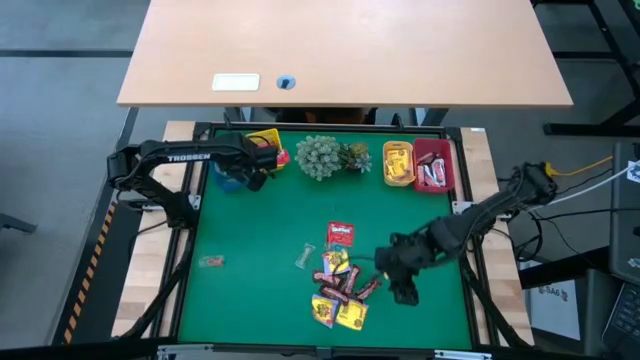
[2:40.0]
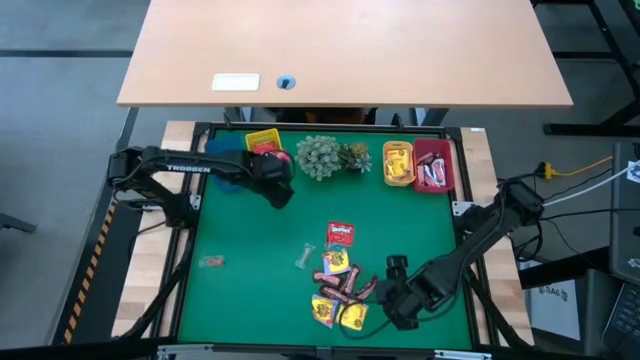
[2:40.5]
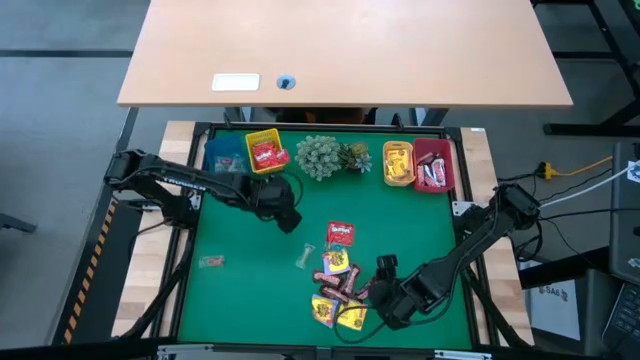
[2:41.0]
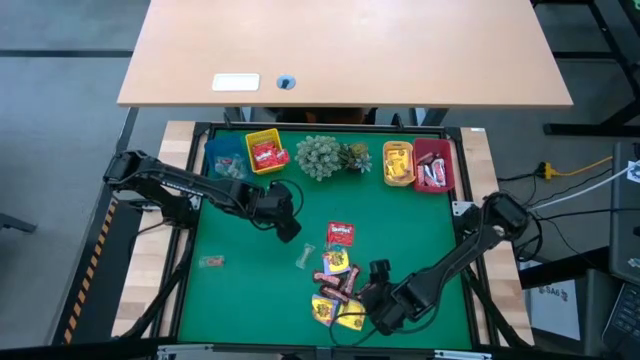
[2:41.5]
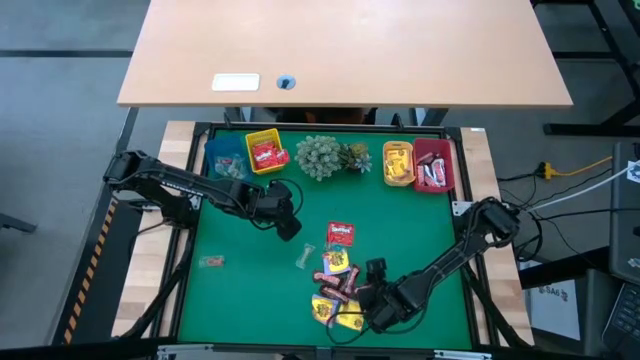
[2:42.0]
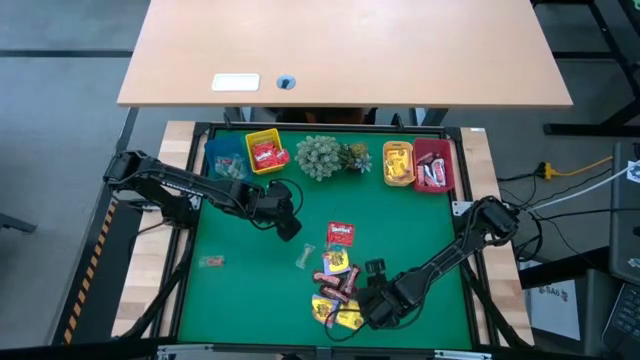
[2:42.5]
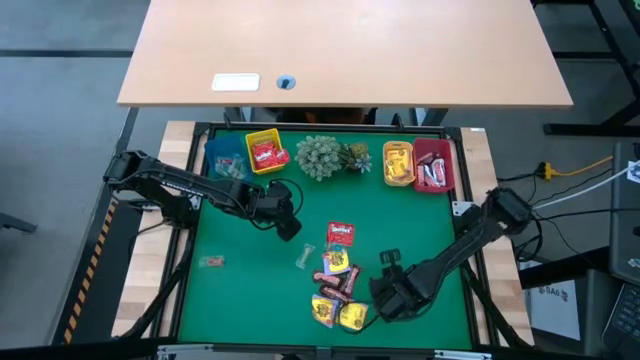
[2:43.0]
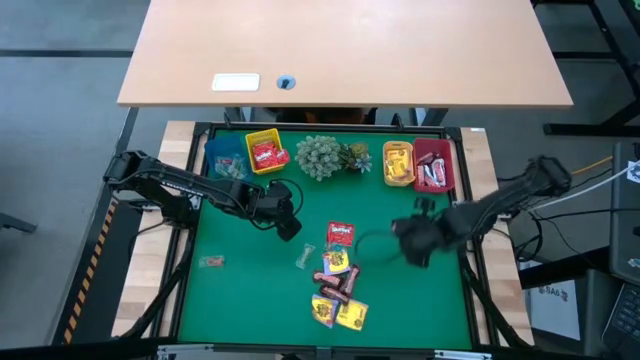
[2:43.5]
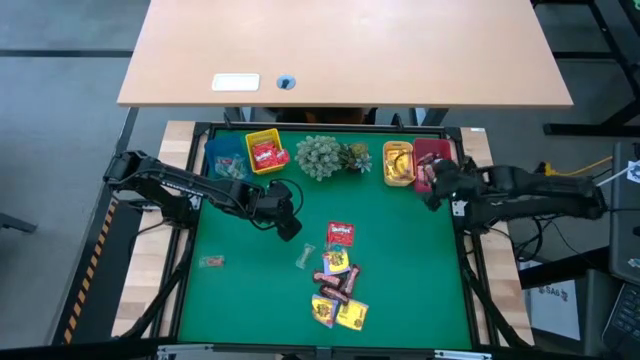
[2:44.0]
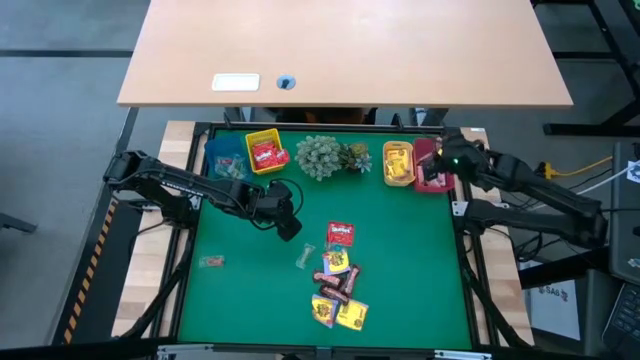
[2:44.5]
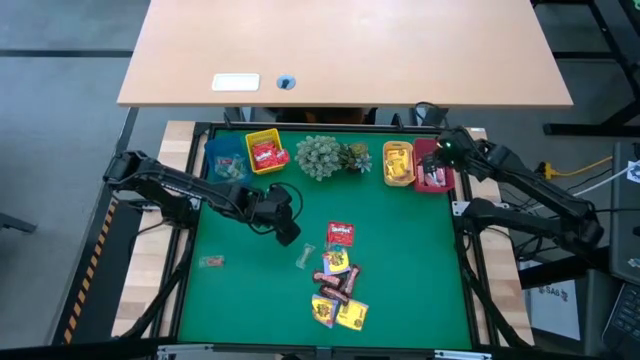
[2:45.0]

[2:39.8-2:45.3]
Task: Sort candy
Put the brown chocolate into the red bin

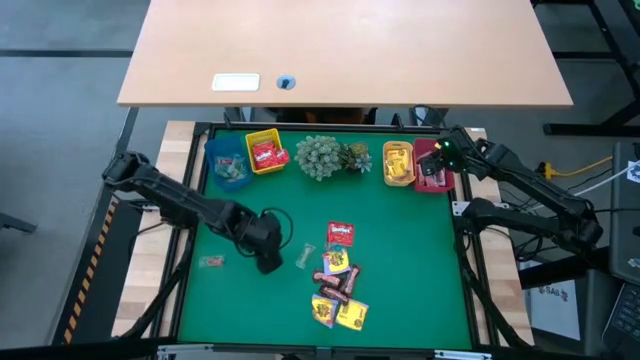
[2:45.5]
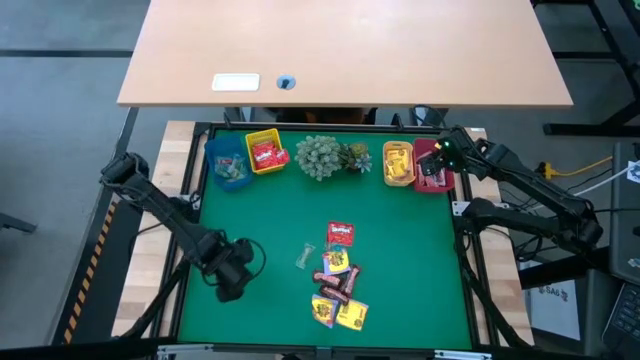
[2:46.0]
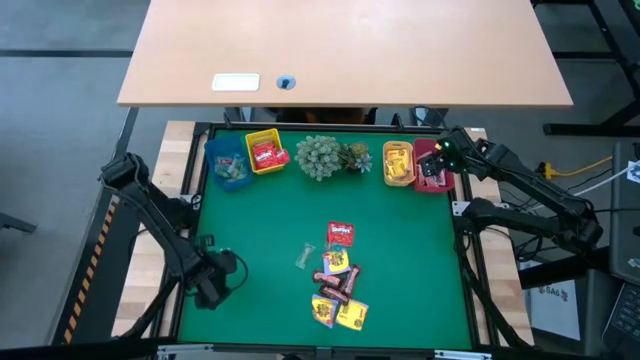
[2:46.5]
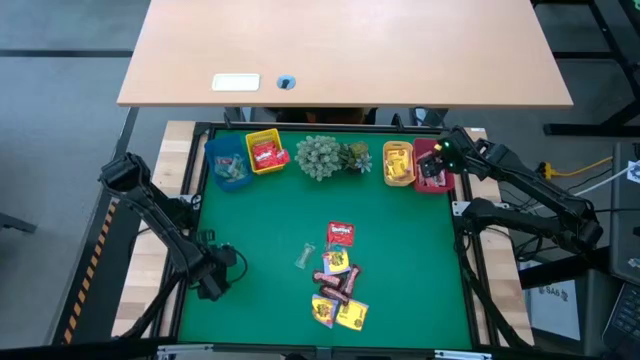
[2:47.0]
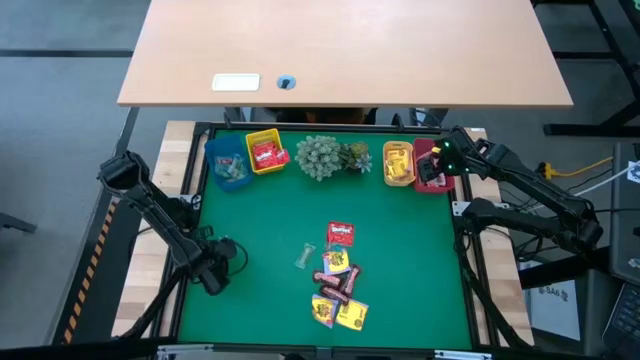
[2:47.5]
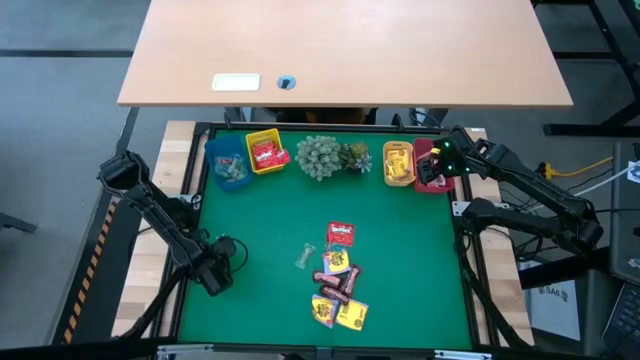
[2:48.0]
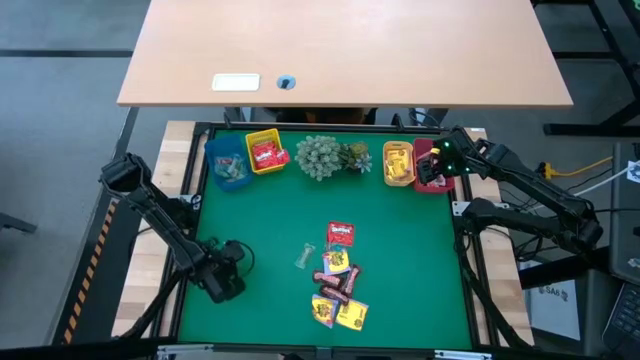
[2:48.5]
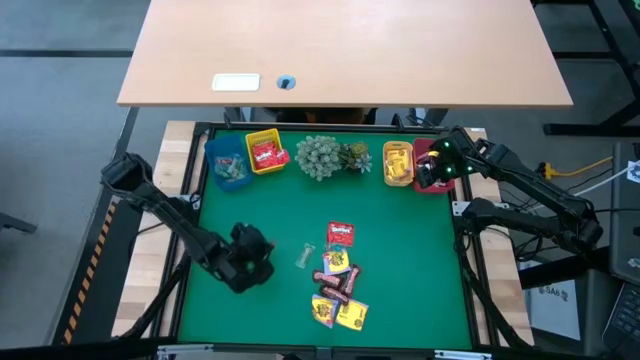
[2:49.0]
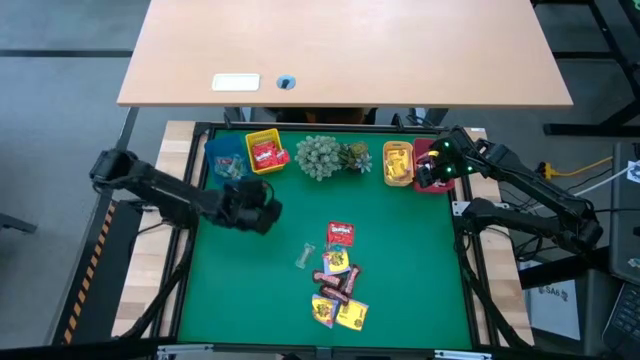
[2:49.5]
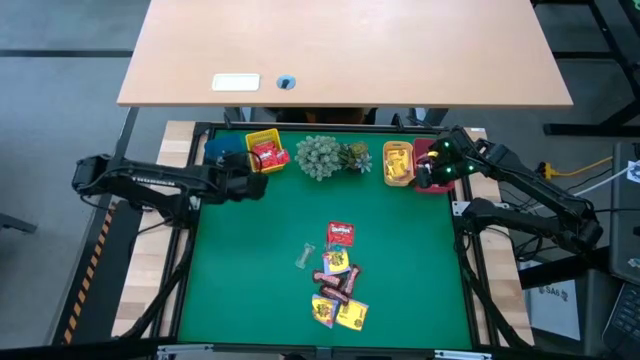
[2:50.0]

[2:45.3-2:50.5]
Put the orange gummy into the blue bin

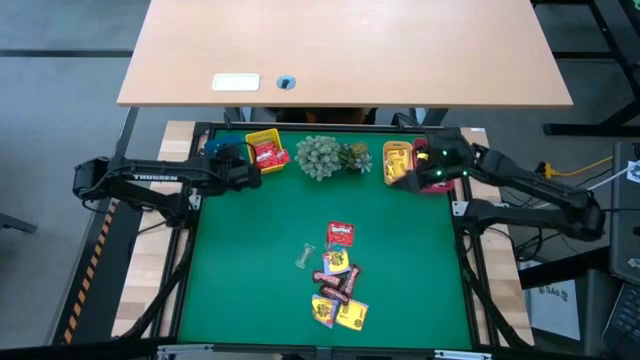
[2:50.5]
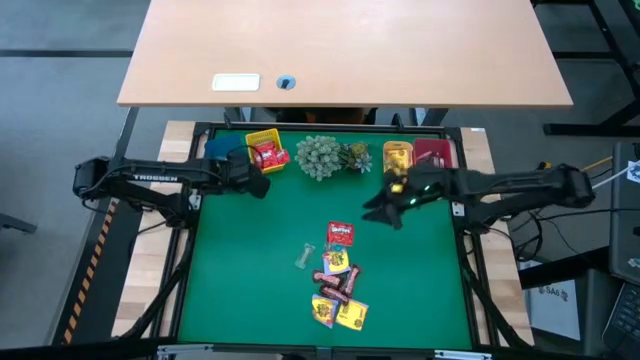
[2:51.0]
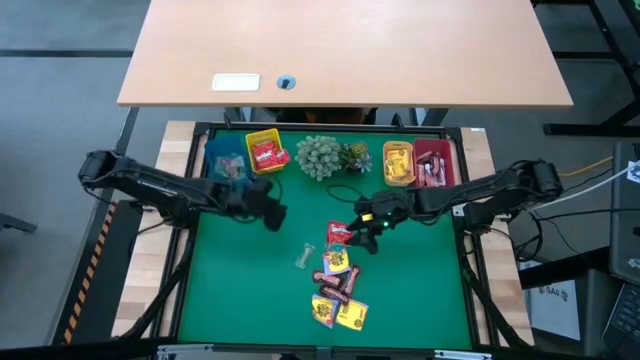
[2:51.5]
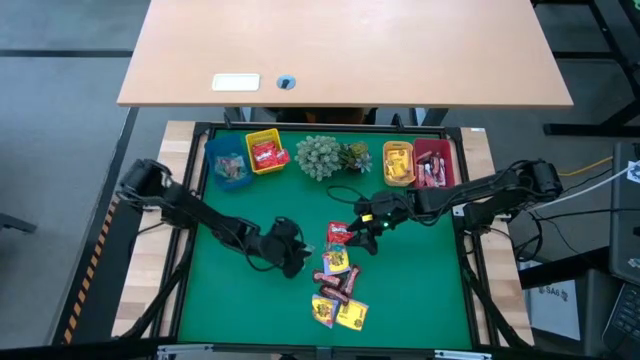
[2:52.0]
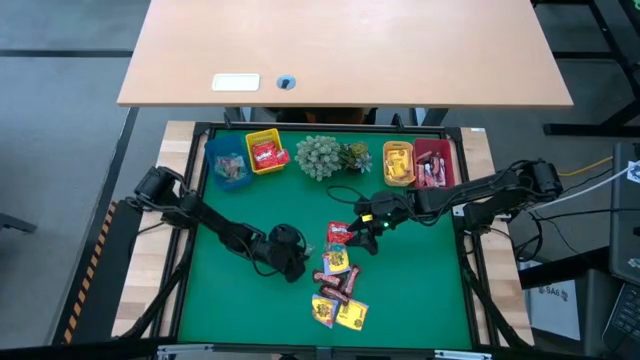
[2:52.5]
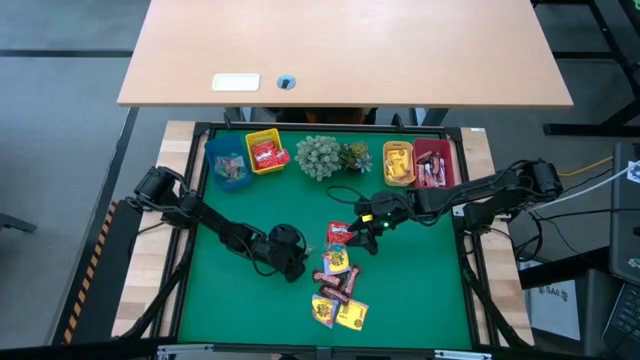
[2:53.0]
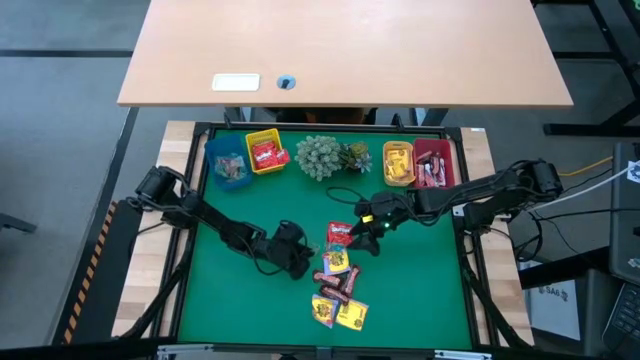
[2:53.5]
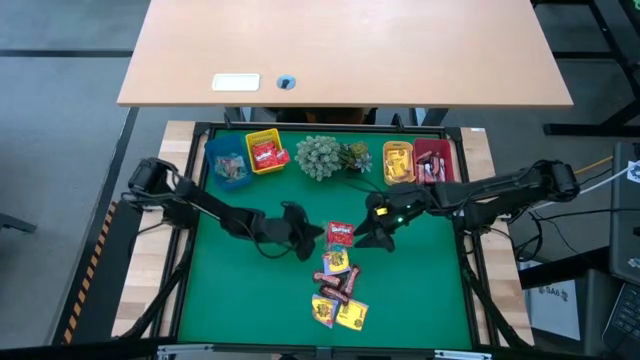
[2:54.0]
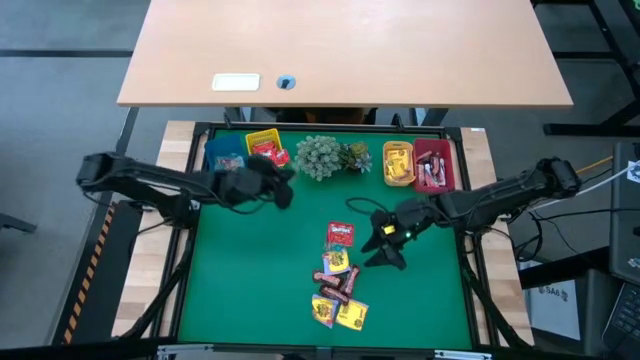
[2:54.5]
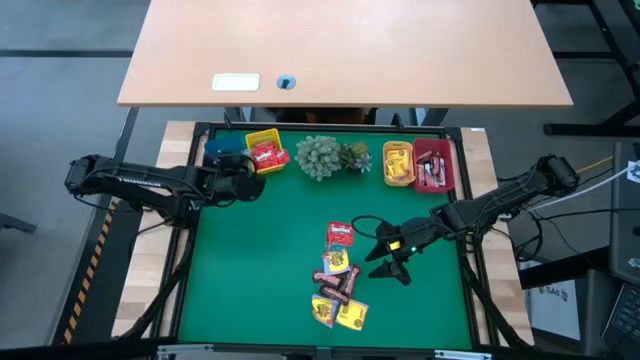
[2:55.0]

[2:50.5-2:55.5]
Put the green gummy into the blue bin

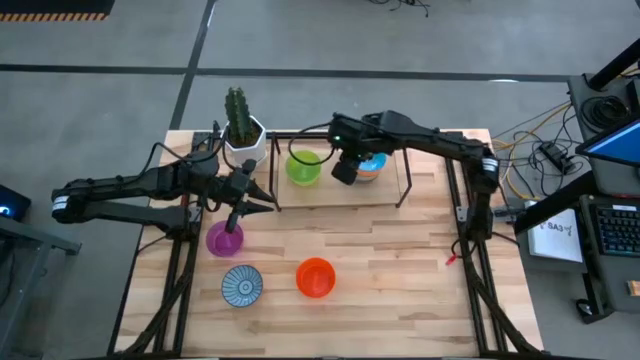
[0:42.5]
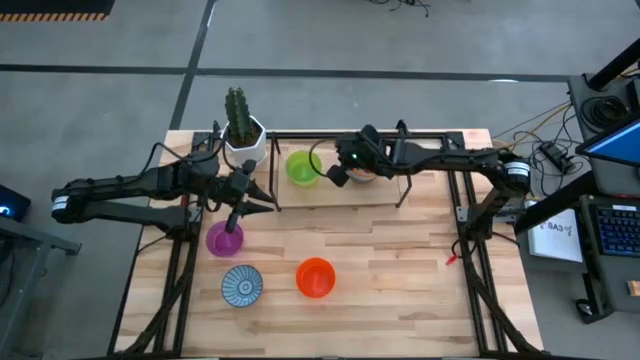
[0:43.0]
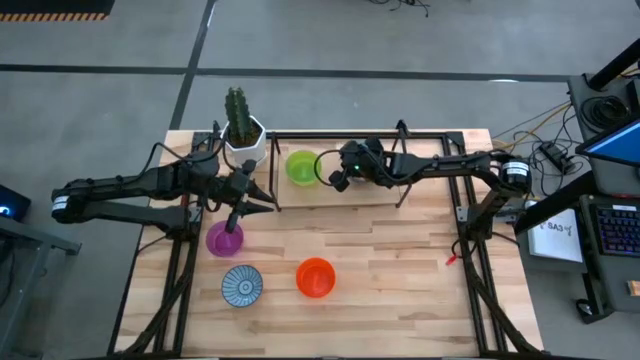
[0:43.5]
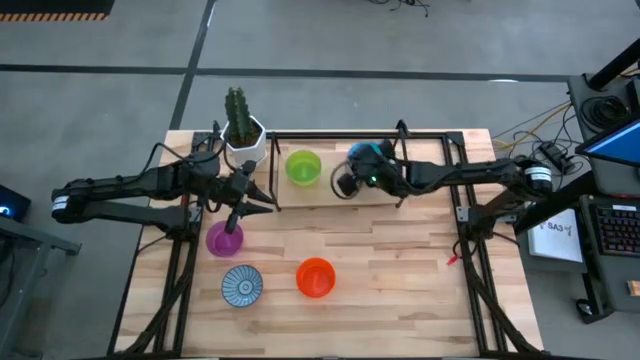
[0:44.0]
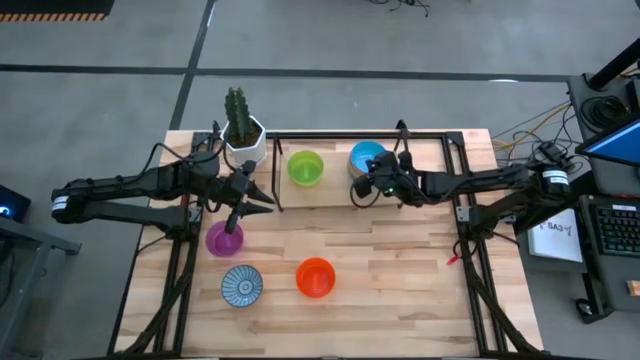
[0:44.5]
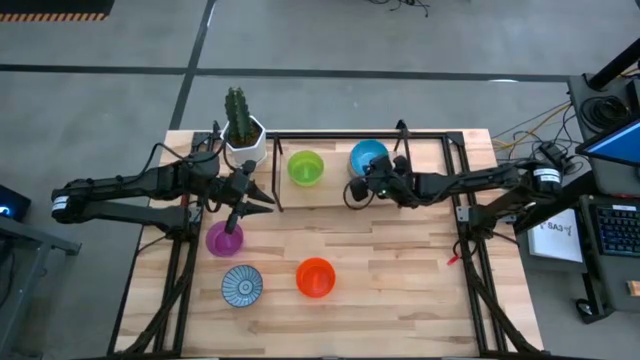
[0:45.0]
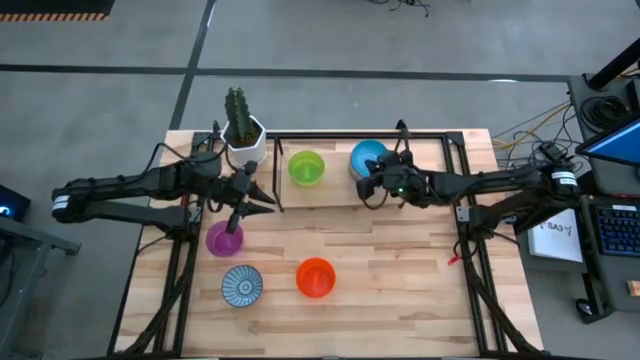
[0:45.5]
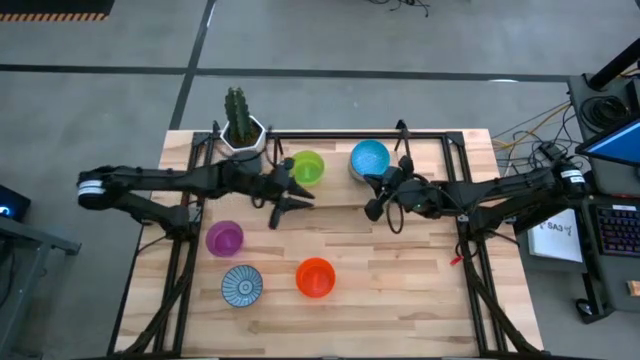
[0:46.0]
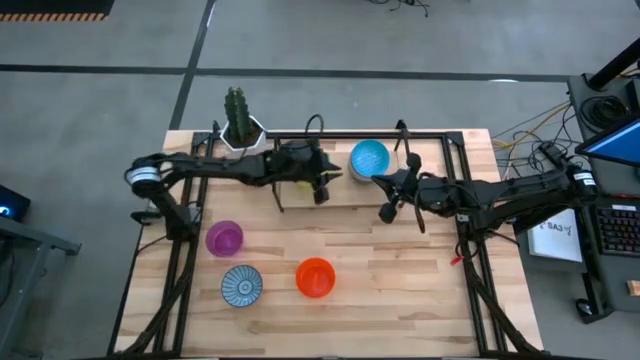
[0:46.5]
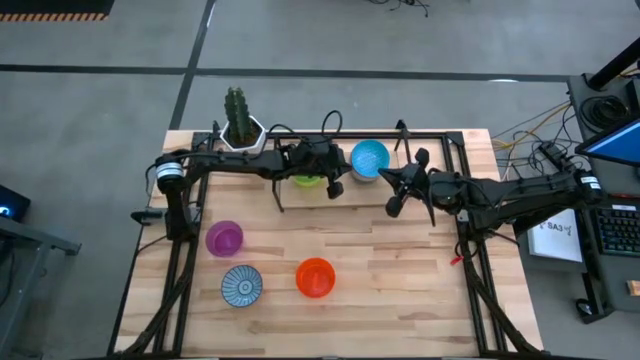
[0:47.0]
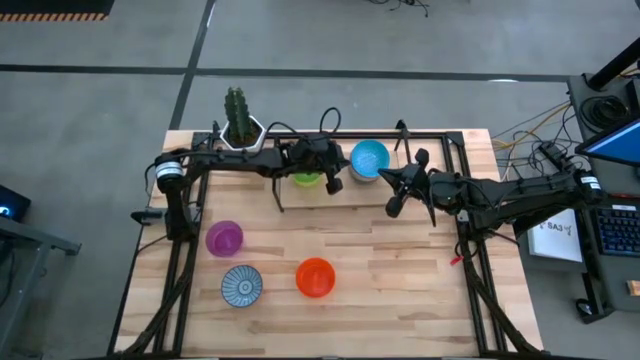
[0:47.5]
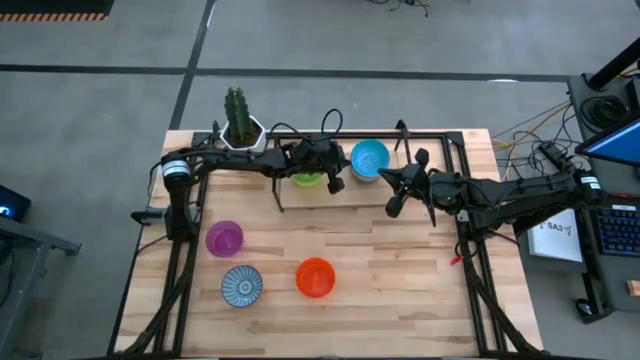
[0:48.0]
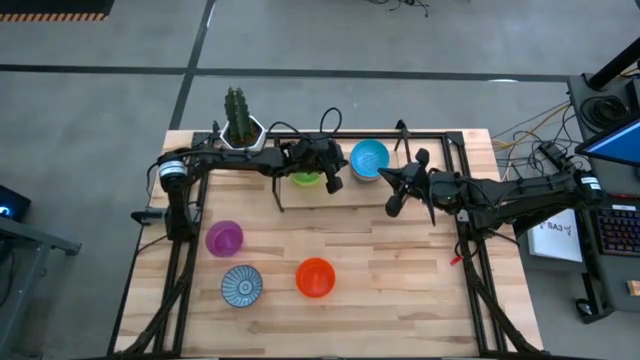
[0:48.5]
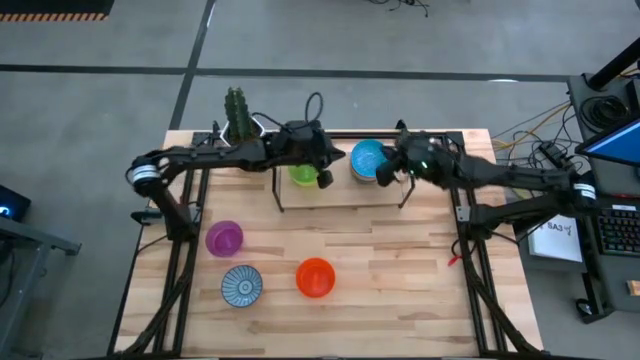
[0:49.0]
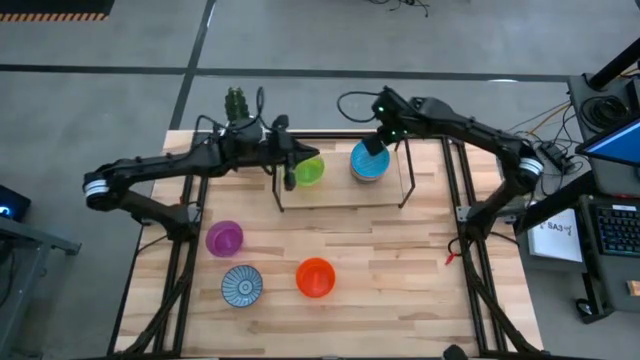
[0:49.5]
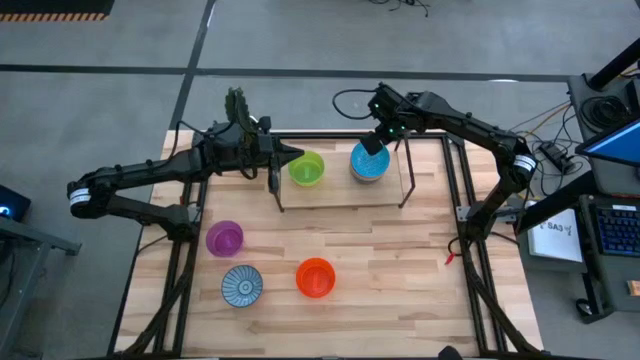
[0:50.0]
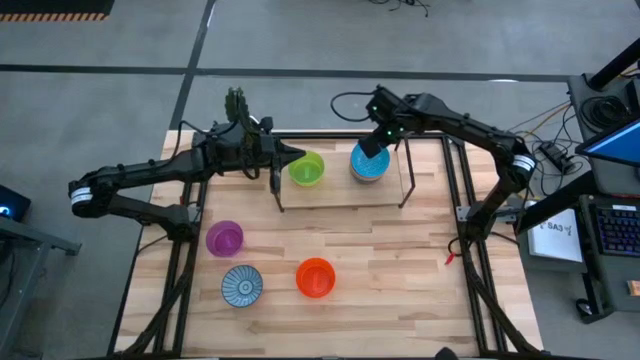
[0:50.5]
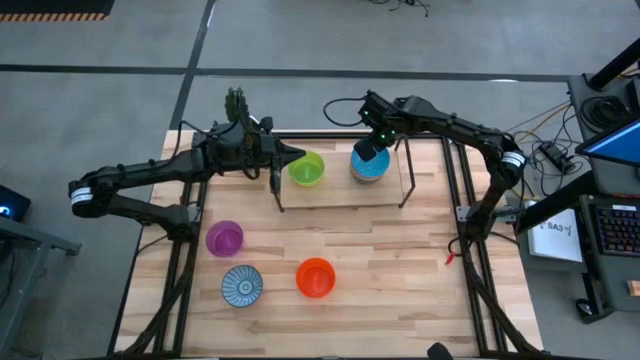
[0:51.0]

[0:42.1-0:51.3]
Task: Place and stack bowls onto a shelf
Adjust the blue pattern bowl
